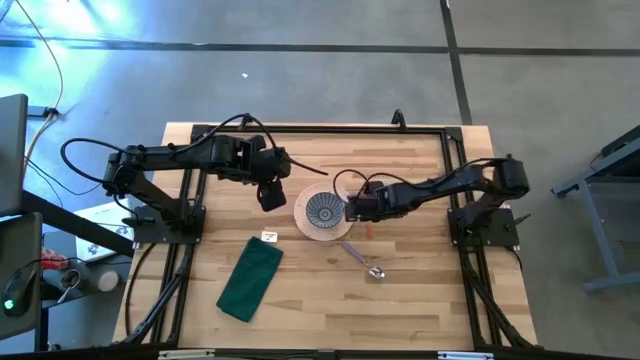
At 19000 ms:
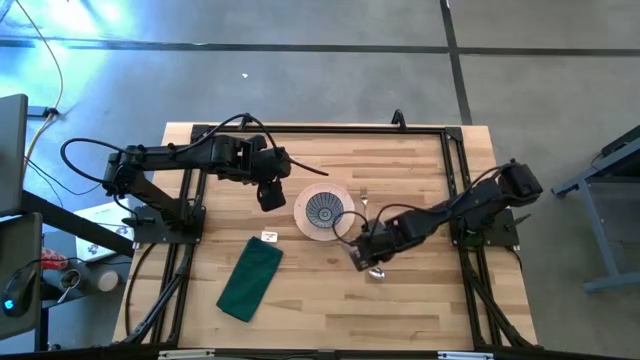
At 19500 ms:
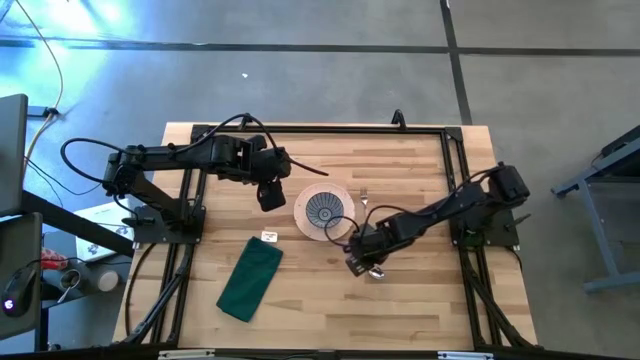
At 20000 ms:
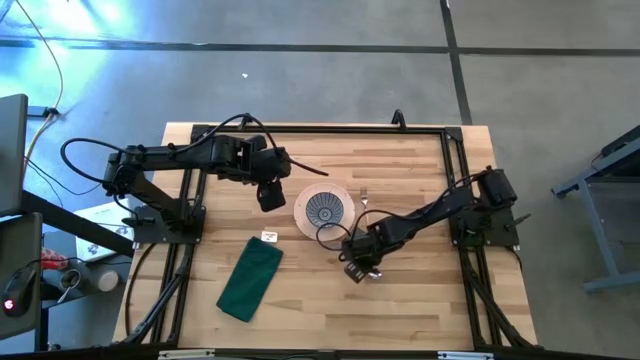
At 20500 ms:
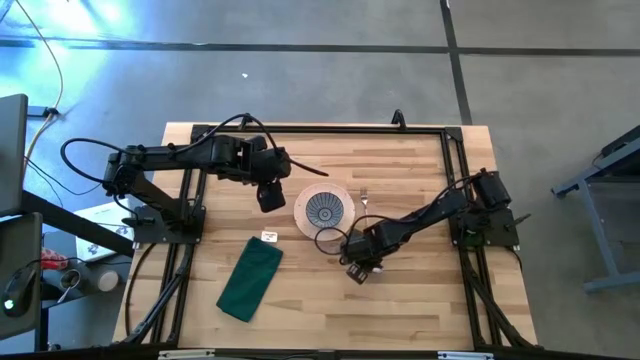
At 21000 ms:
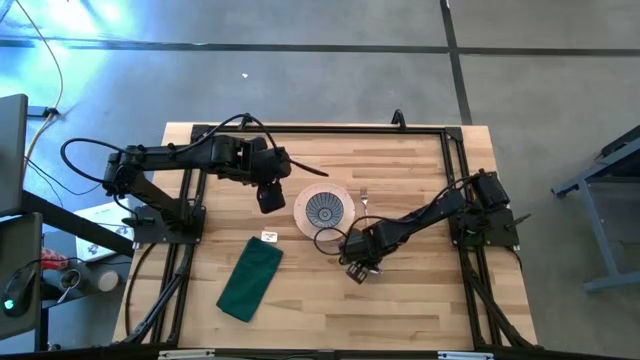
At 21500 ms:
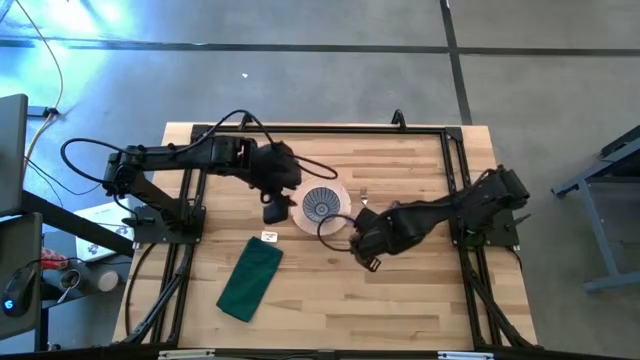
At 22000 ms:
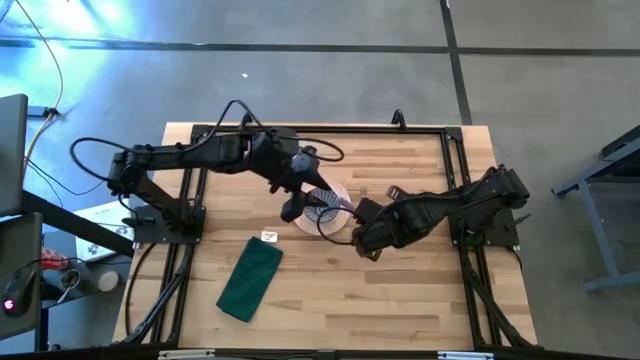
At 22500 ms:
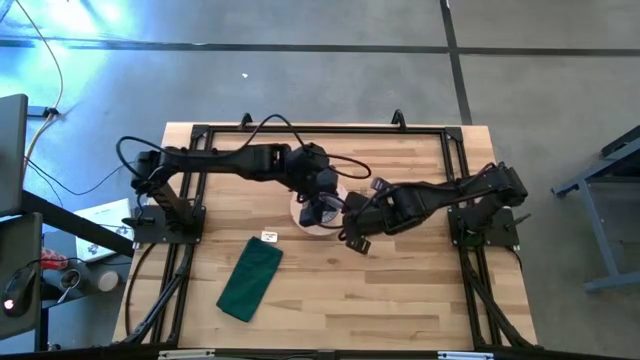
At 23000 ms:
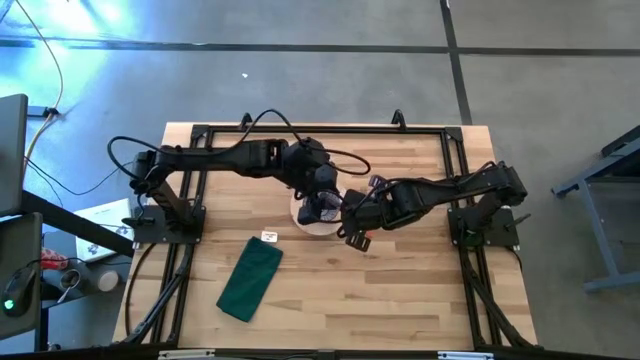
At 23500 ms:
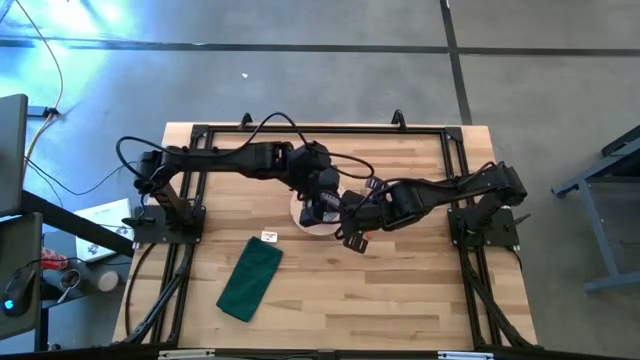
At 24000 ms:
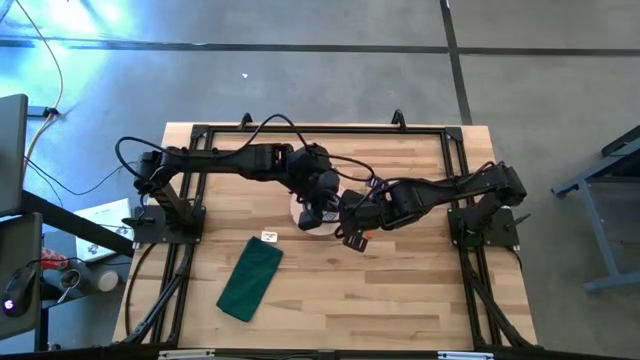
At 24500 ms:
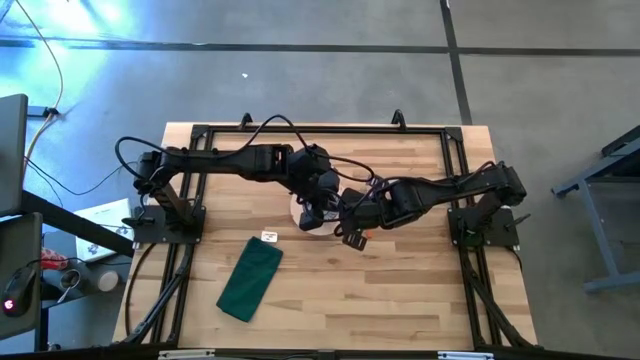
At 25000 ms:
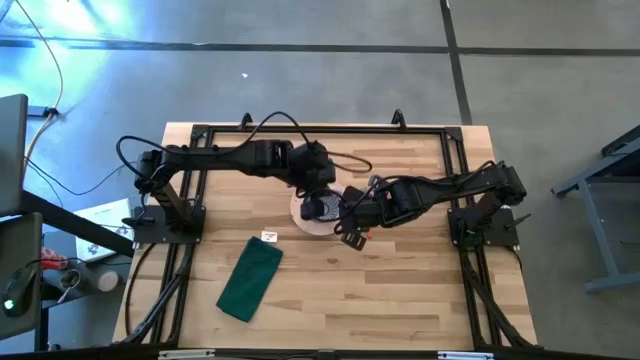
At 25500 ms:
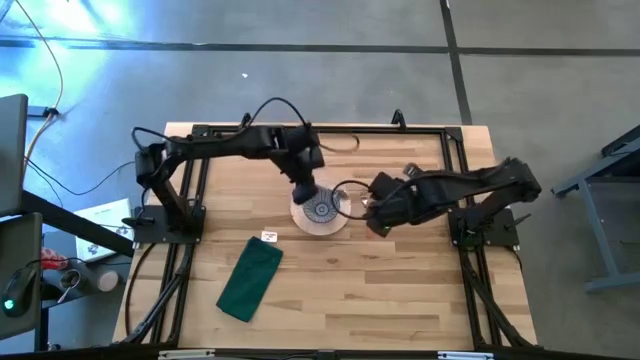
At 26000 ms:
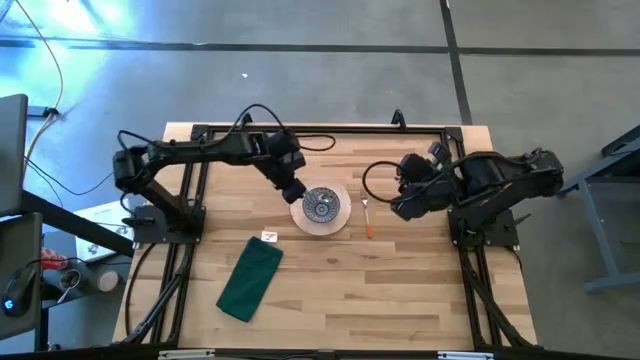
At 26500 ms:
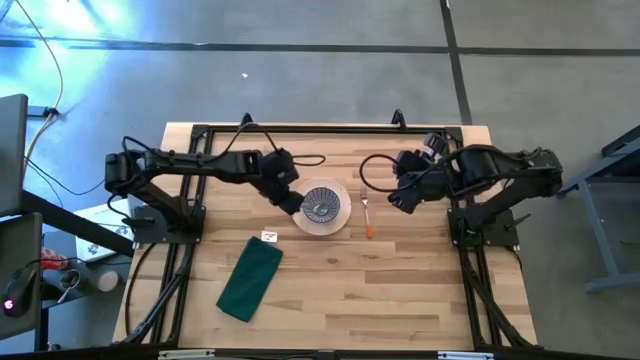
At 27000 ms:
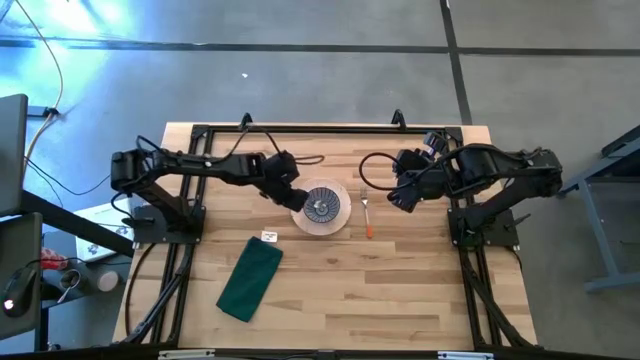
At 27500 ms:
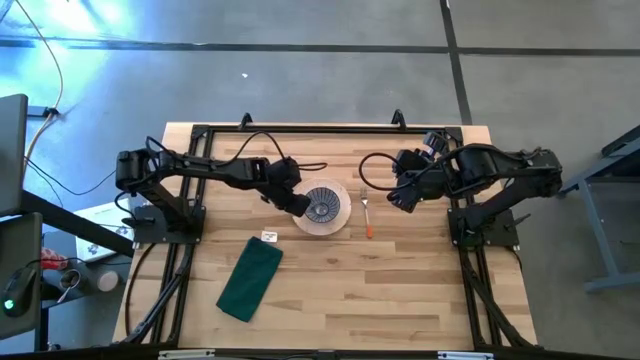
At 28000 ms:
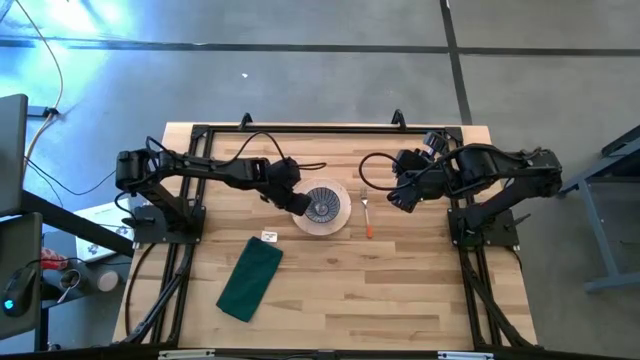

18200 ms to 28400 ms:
Task: Set table place
Put the spoon on the stripe red bowl

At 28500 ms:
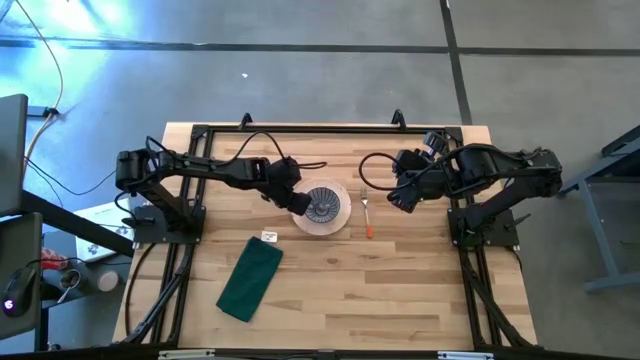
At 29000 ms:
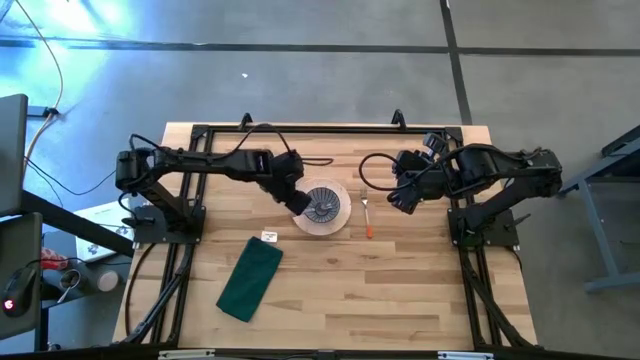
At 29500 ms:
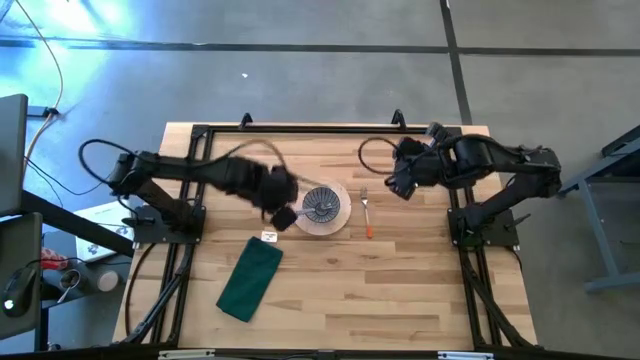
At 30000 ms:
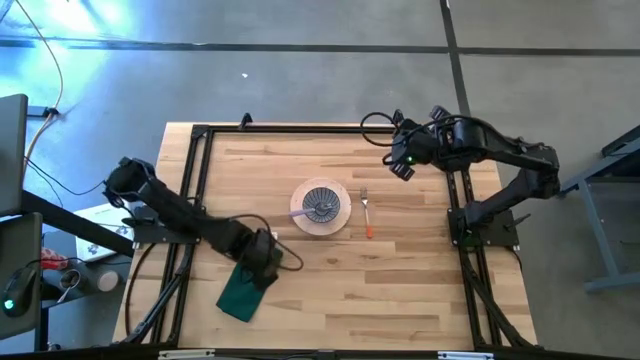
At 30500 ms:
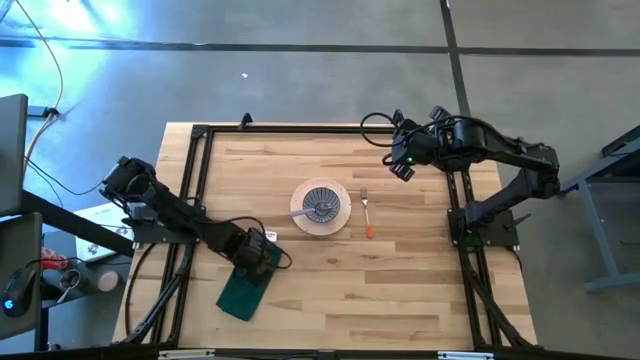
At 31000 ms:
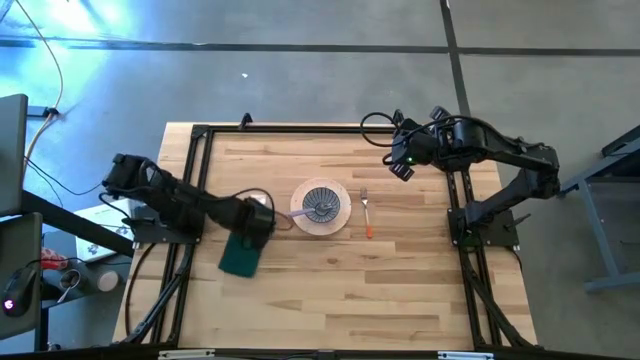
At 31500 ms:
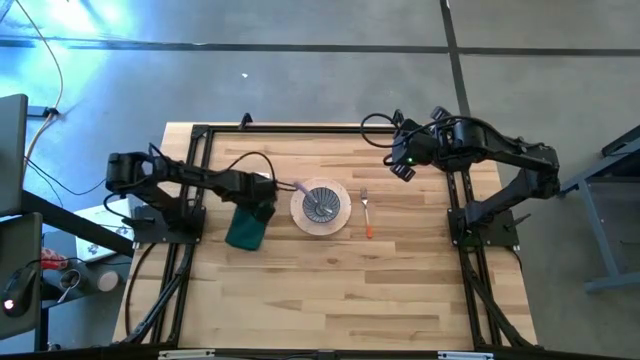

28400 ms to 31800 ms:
Move the green towel to the left of the white plate on the table

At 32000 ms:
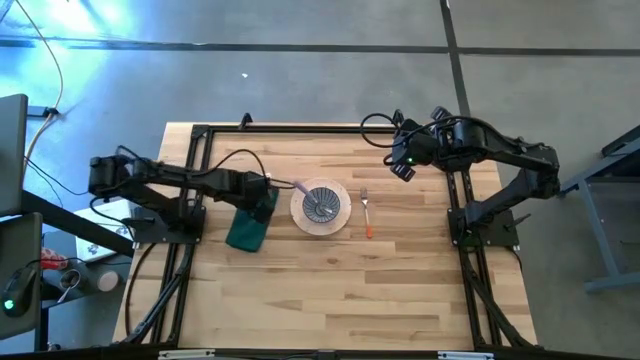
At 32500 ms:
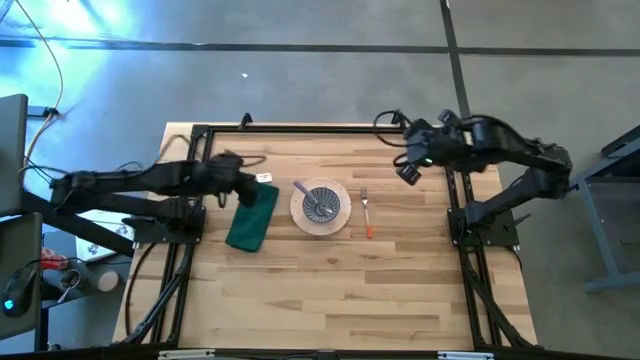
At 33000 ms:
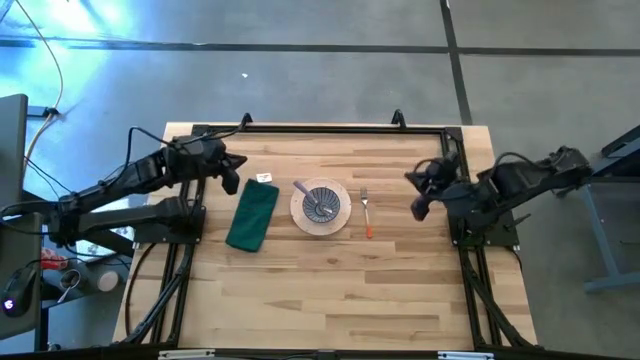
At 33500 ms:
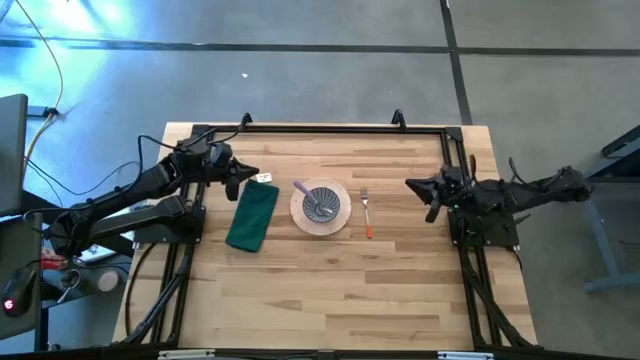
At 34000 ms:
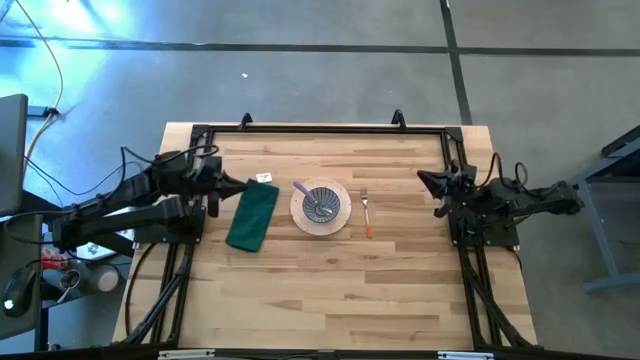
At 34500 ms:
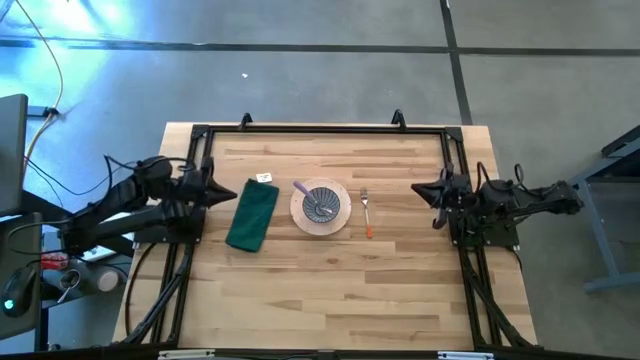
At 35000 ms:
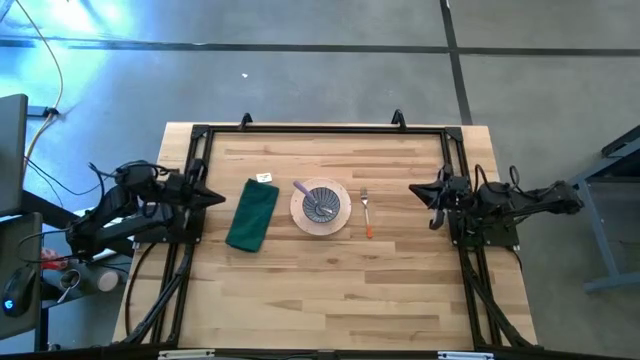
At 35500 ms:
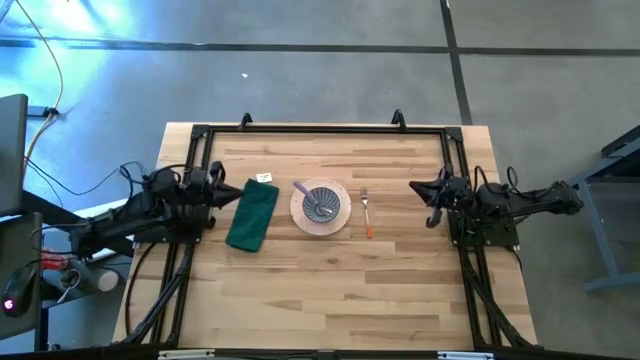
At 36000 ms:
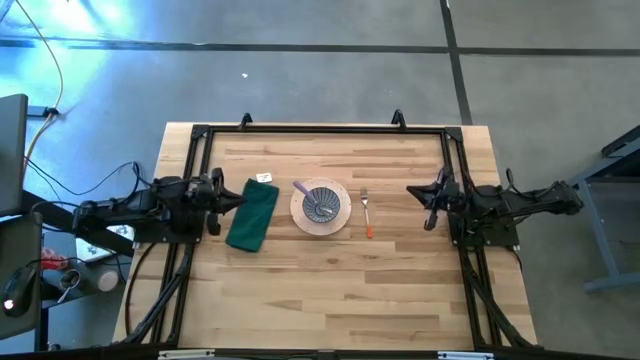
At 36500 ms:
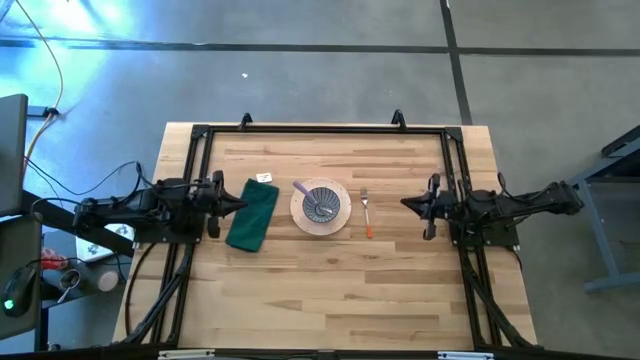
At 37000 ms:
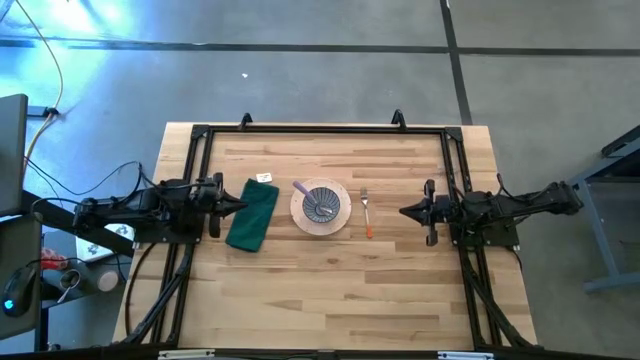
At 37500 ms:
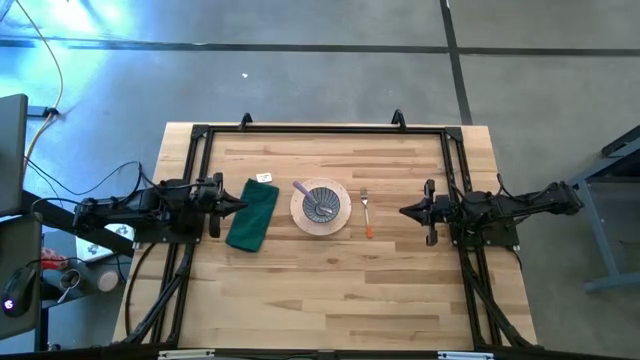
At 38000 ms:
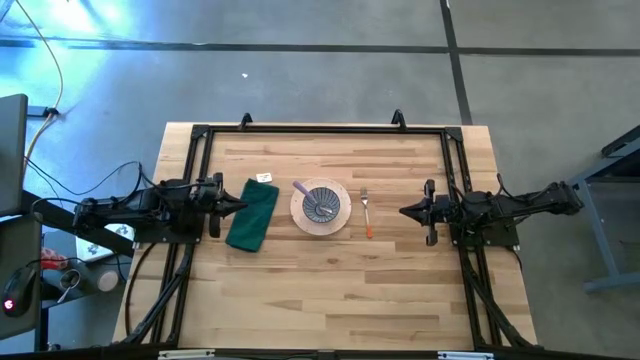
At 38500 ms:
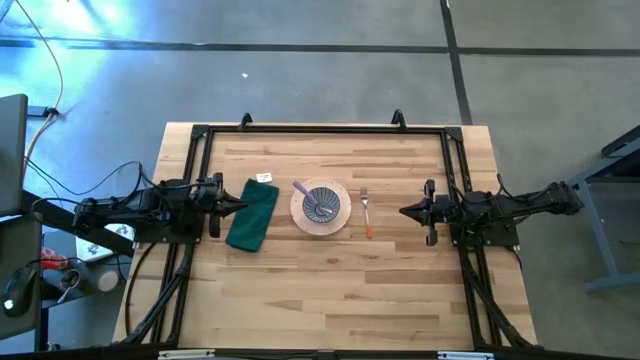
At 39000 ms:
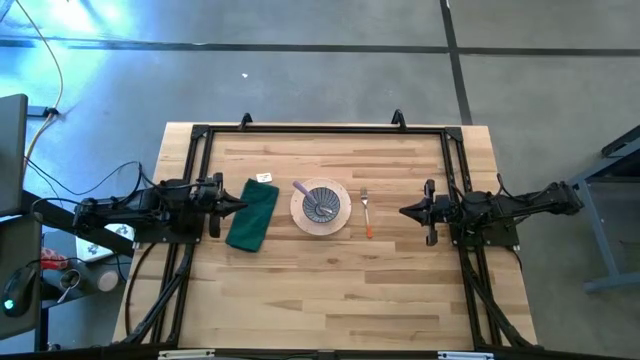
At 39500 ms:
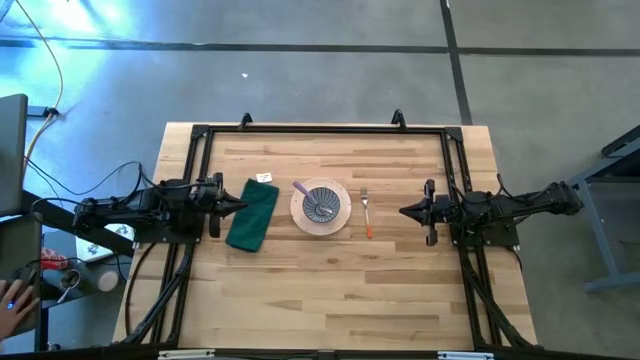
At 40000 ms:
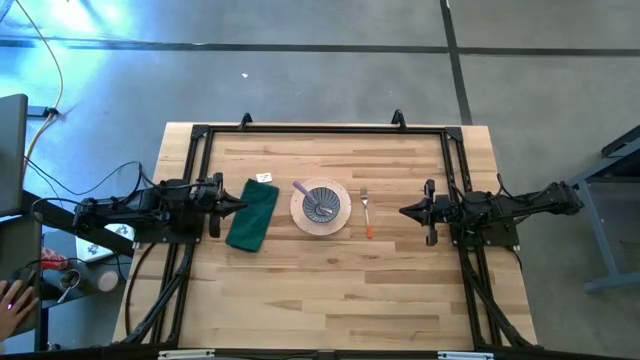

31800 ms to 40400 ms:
Return to Home Position
